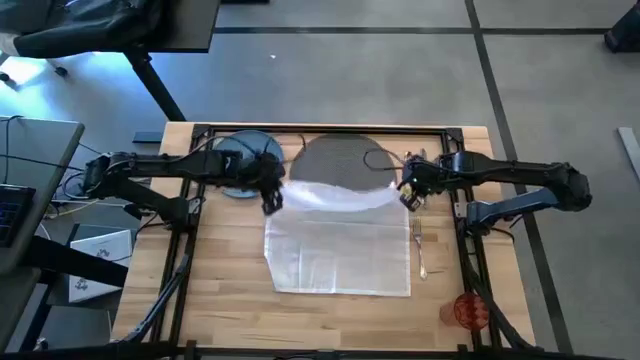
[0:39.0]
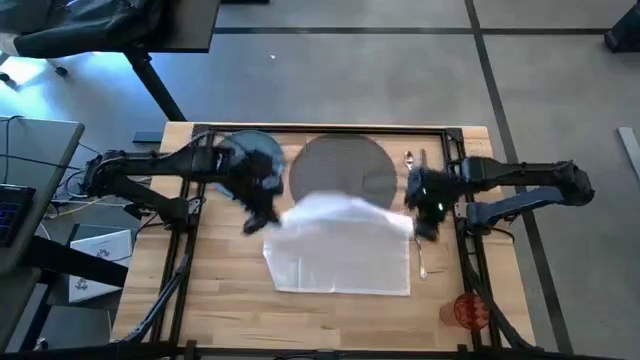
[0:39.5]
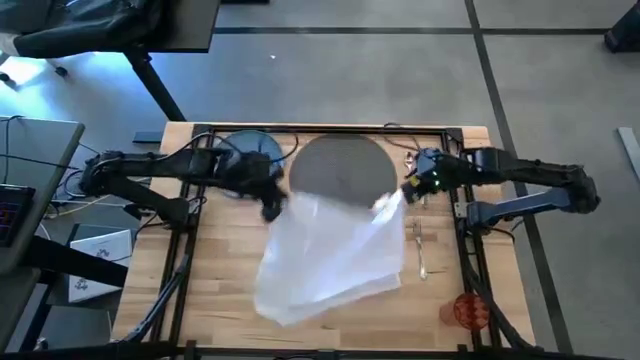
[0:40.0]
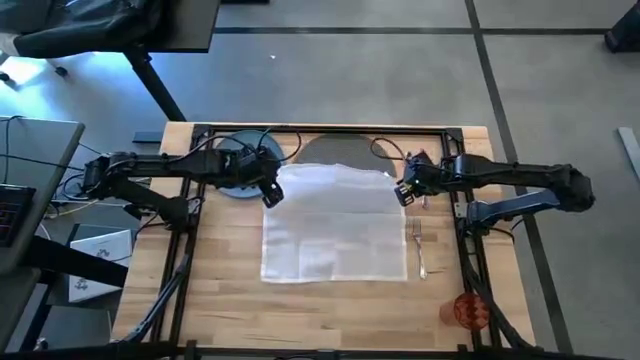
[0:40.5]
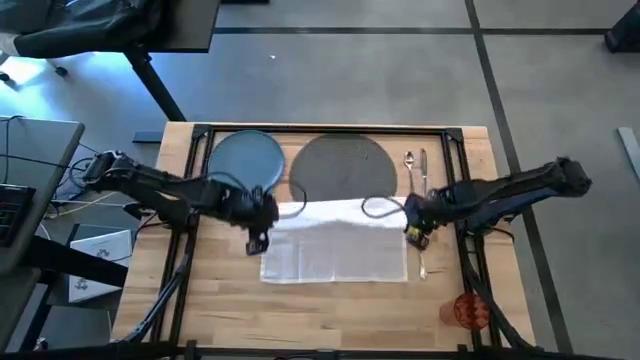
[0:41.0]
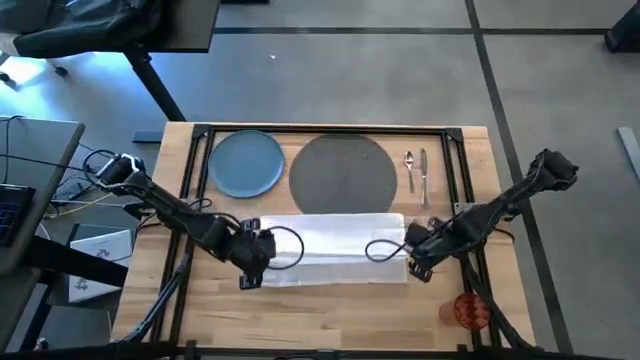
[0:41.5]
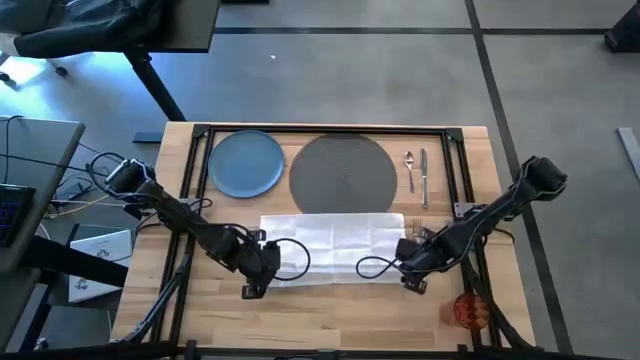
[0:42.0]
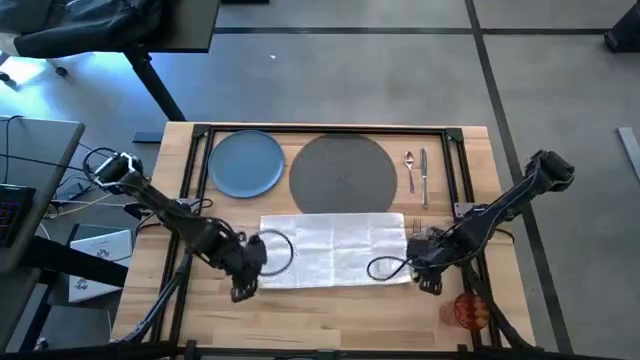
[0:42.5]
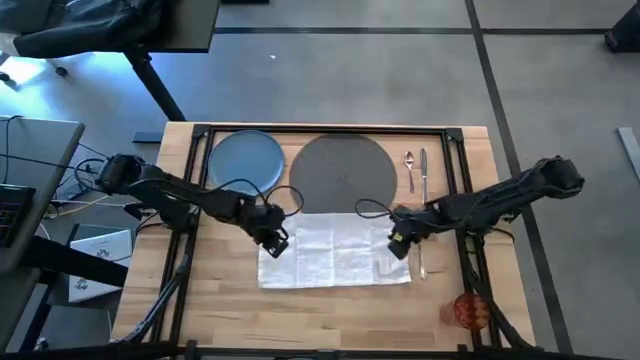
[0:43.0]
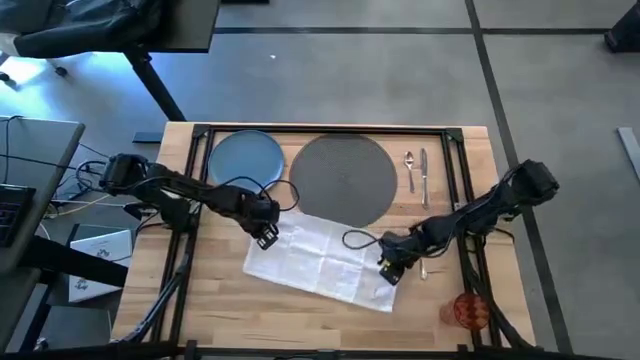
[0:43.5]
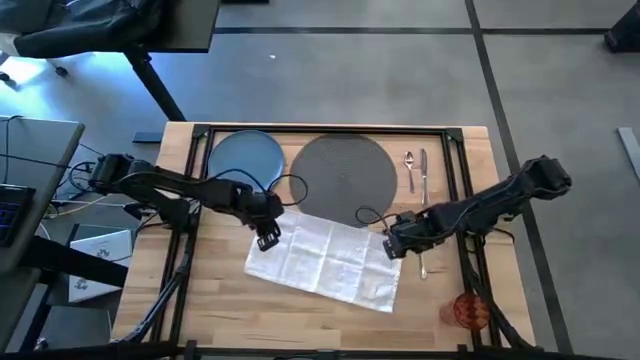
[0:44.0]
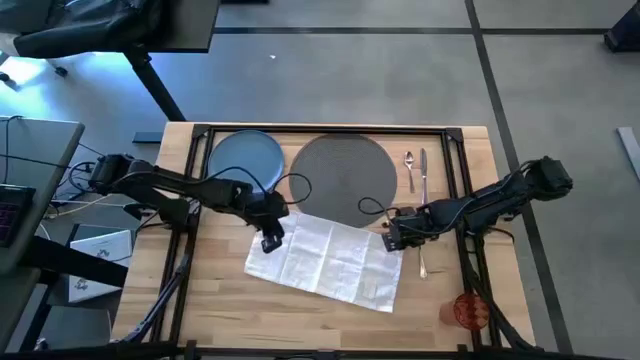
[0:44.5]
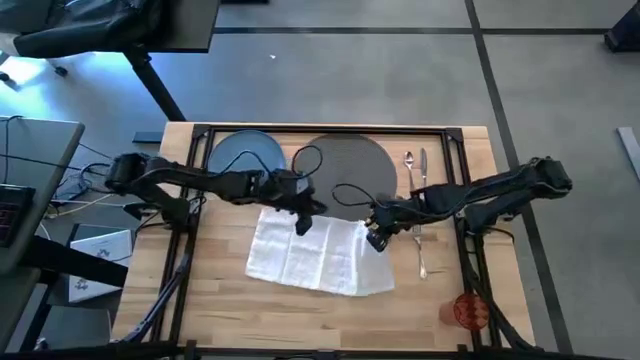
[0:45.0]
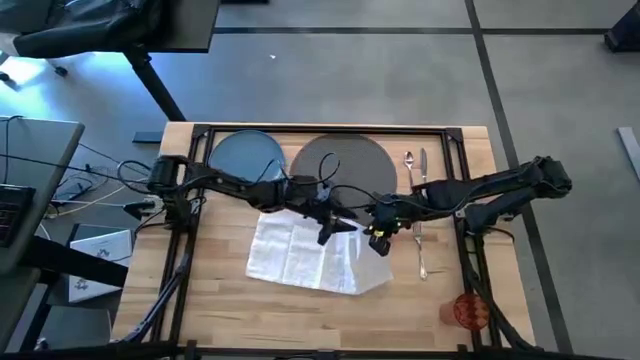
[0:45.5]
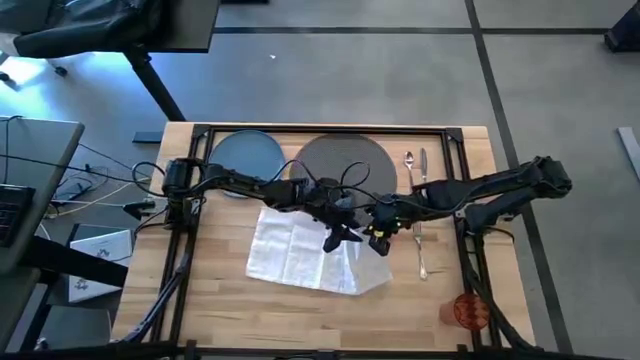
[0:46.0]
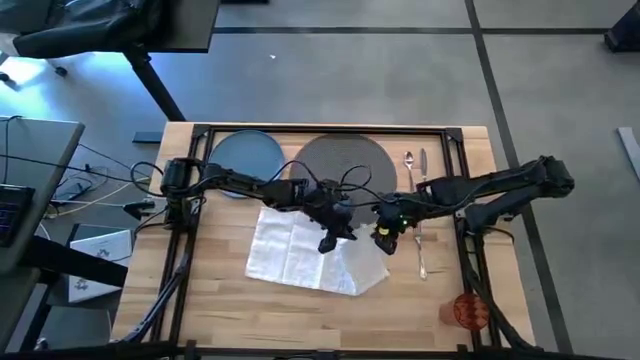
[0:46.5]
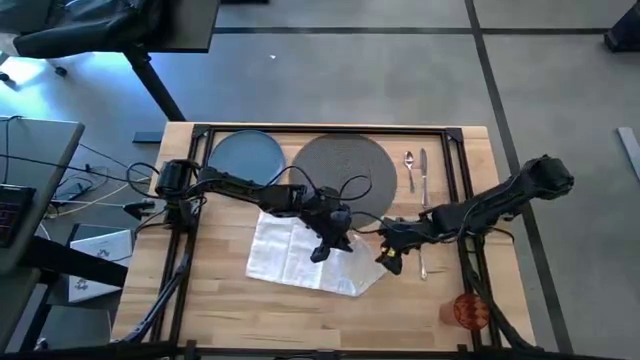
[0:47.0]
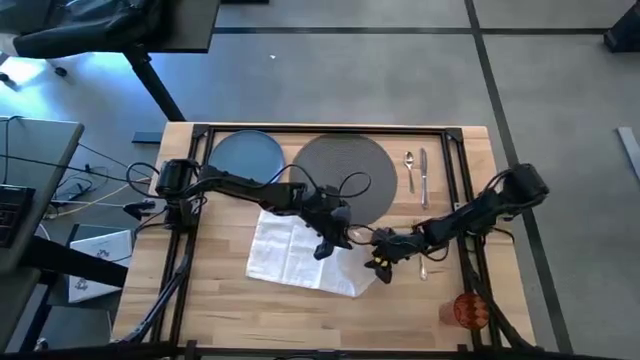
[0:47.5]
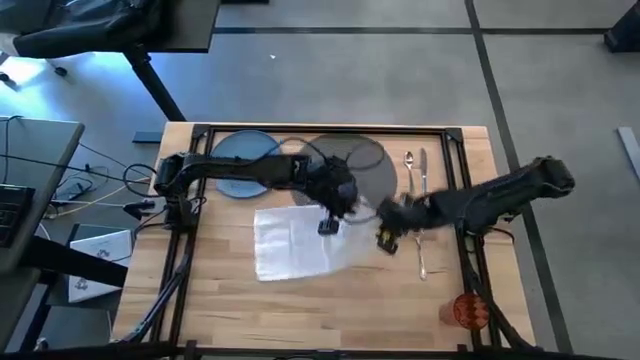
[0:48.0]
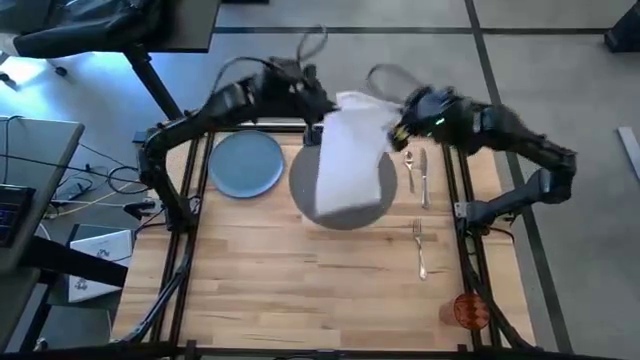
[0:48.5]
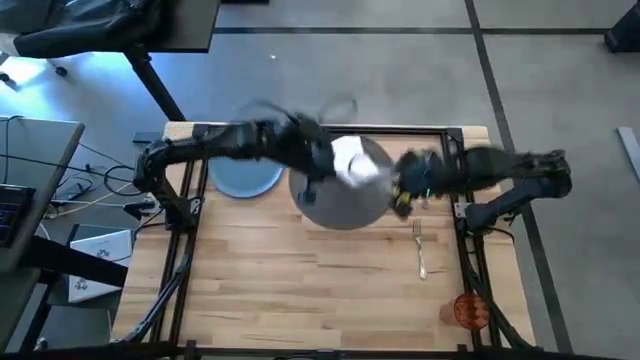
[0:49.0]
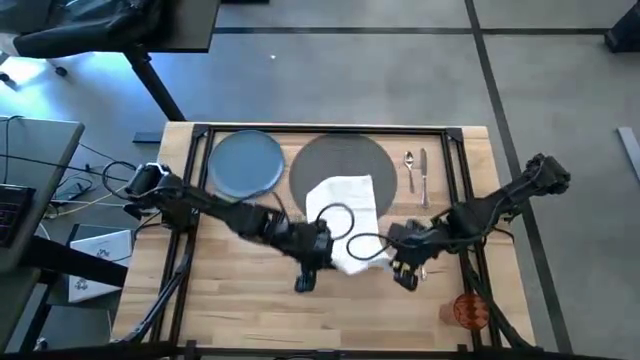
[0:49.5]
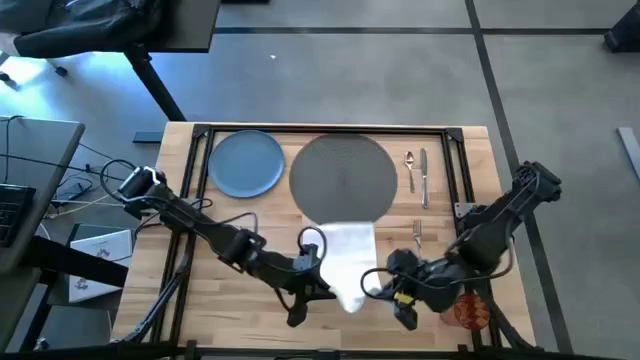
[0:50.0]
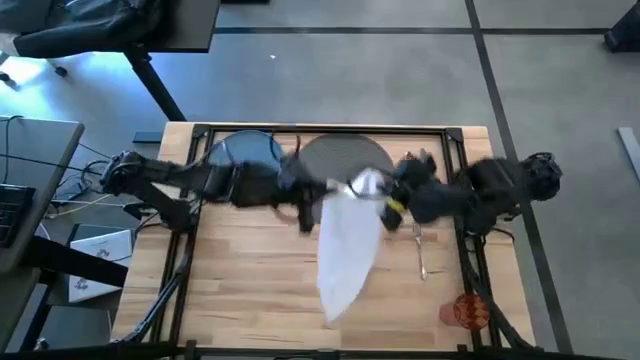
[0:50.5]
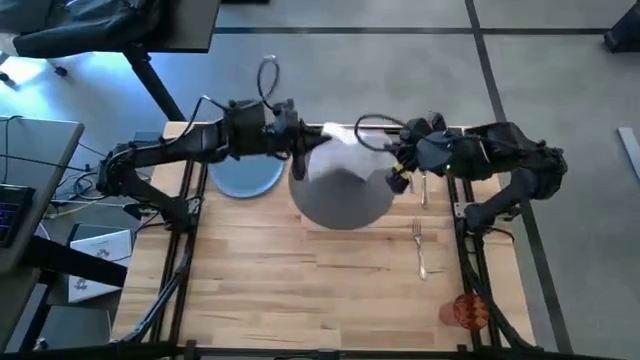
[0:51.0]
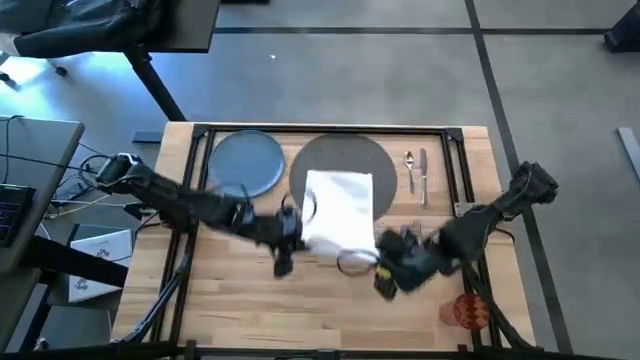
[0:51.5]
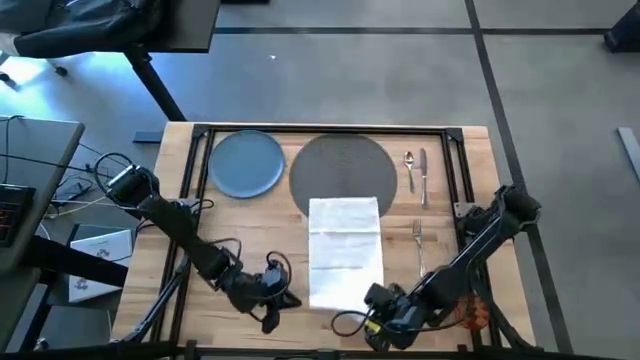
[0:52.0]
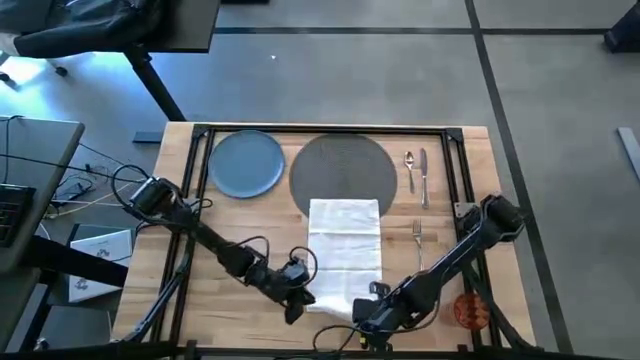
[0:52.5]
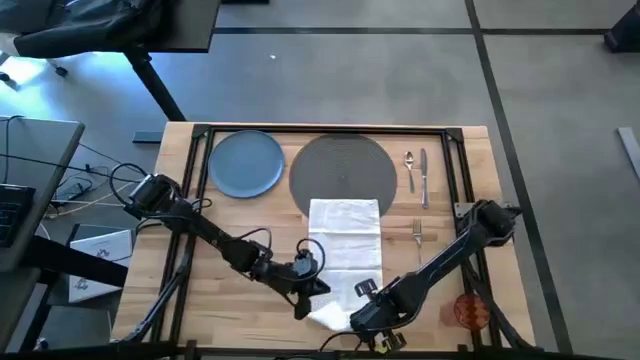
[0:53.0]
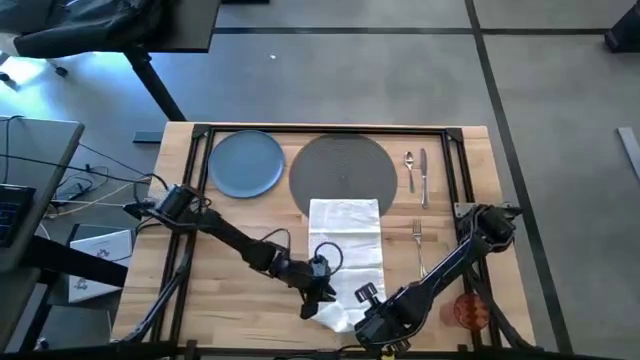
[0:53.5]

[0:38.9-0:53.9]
Task: Set table place
Fold the white table napkin

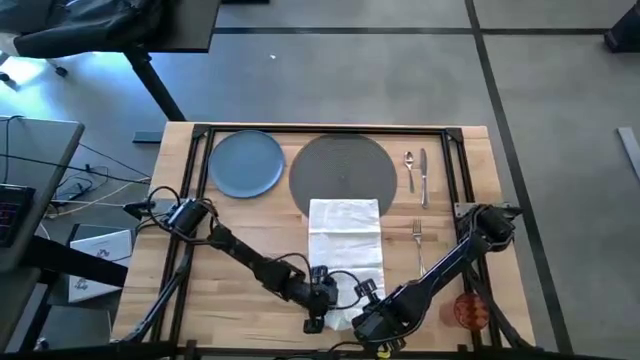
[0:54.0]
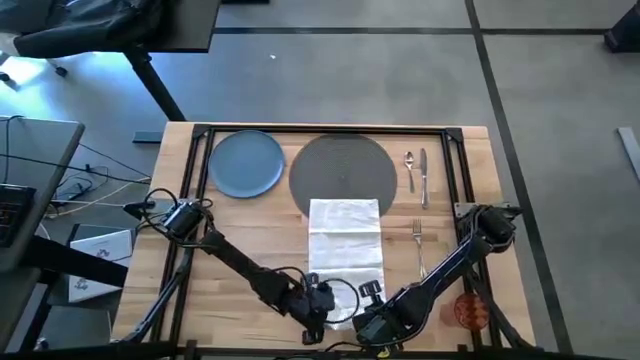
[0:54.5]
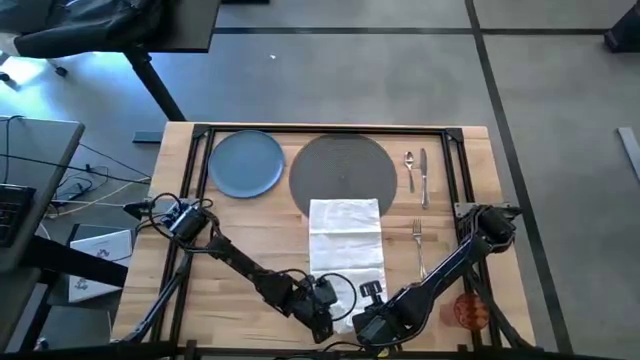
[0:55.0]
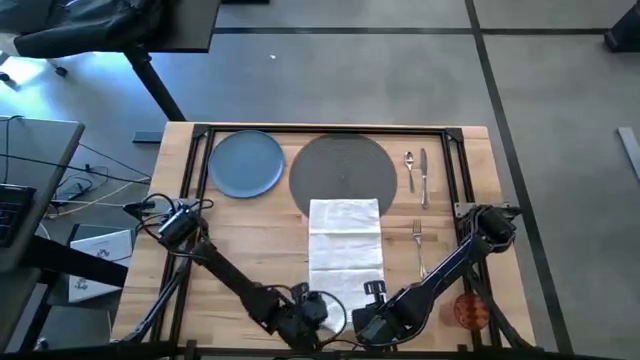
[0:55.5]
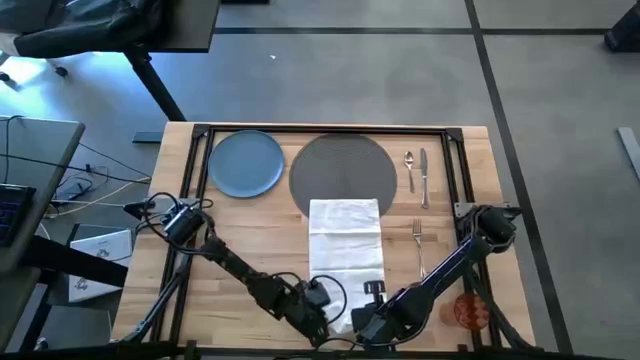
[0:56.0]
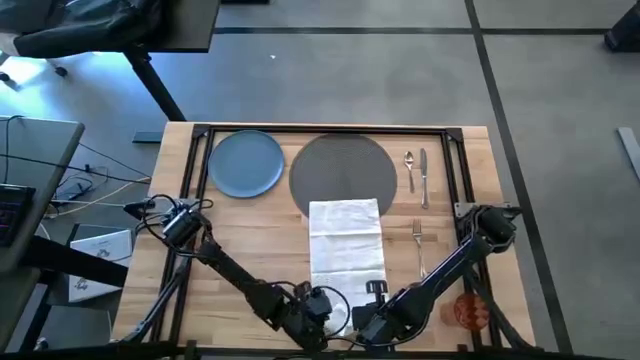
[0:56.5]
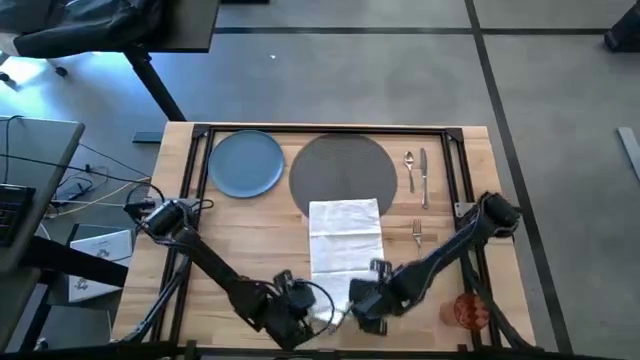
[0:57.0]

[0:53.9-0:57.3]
Fold the white table napkin

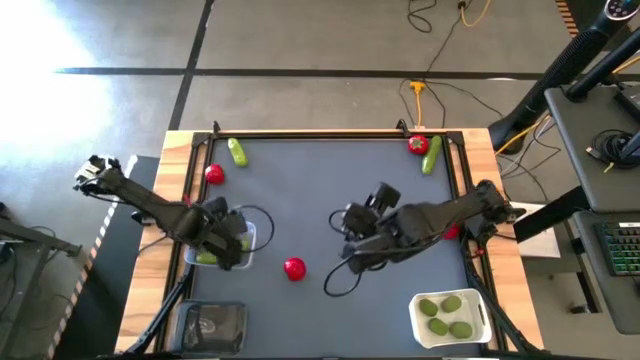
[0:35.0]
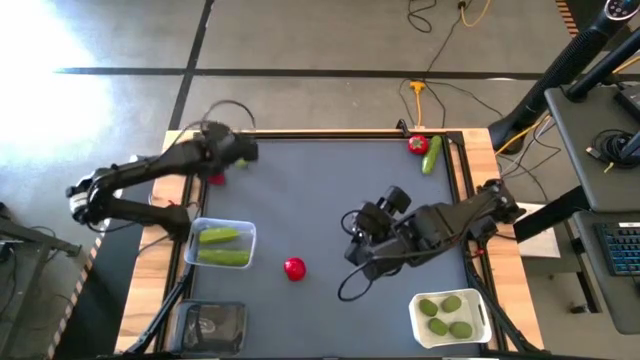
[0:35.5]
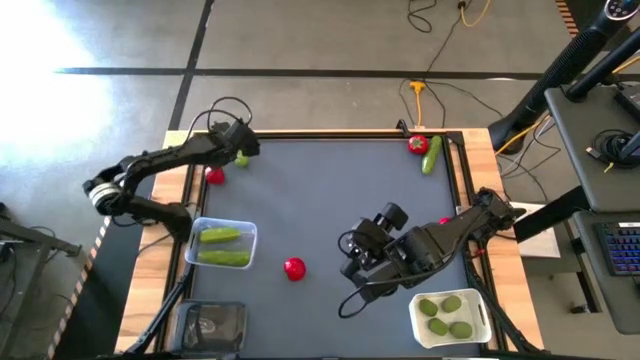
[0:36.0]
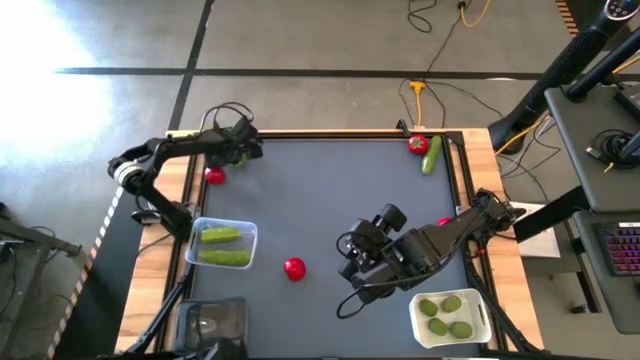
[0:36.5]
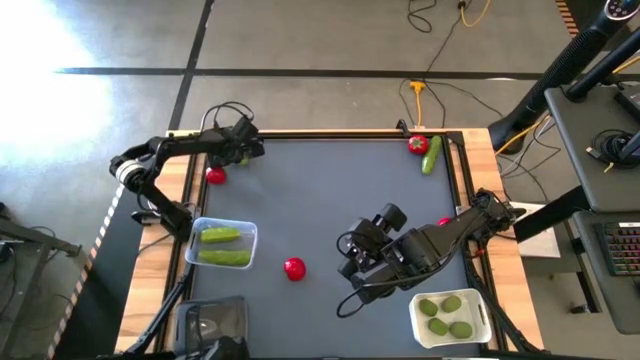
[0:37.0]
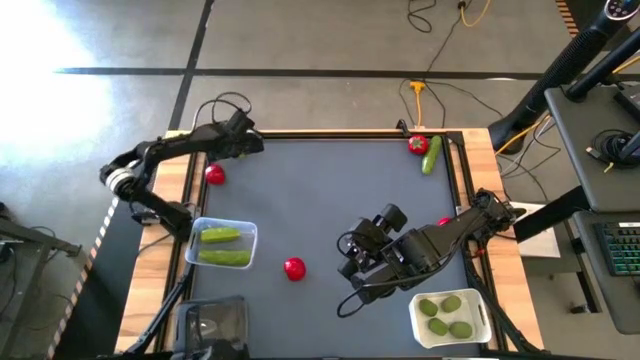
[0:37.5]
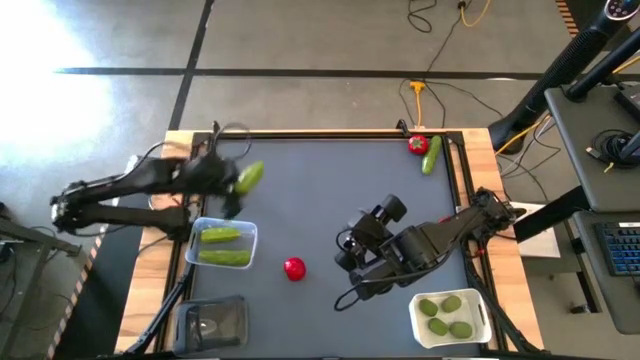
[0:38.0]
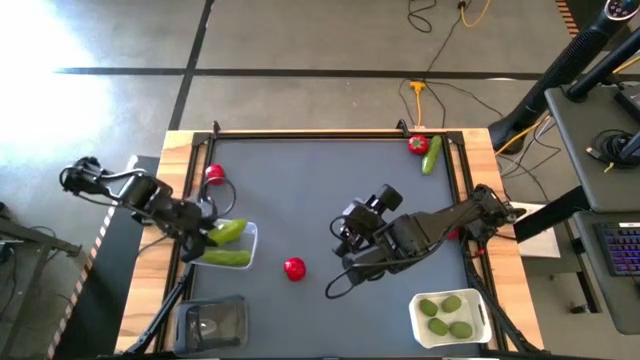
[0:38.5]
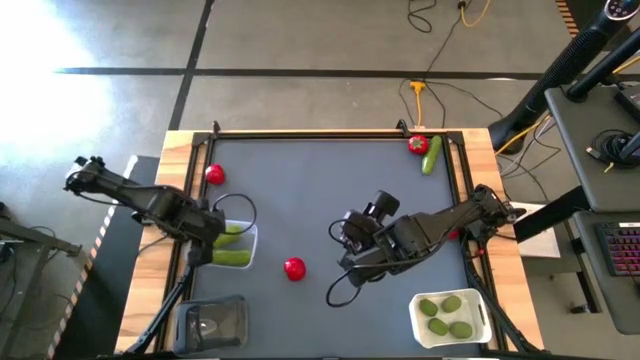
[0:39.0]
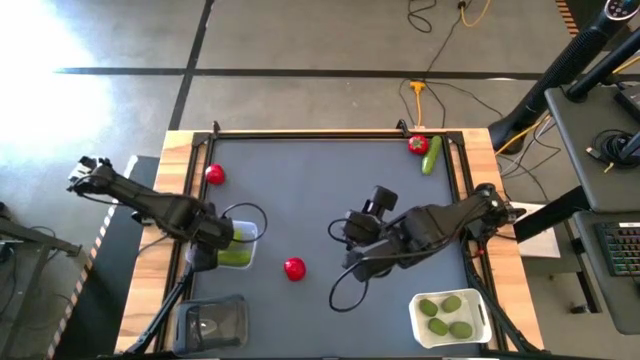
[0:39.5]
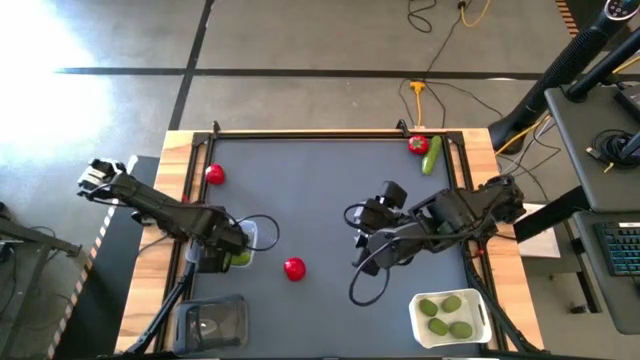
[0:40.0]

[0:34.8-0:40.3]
Task: Sort produce into baskets
Put the left cucumber into the transparent bin
